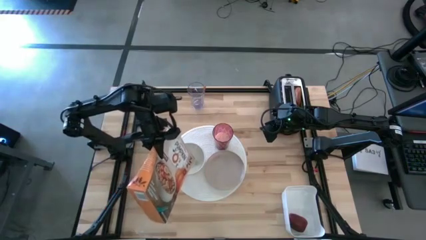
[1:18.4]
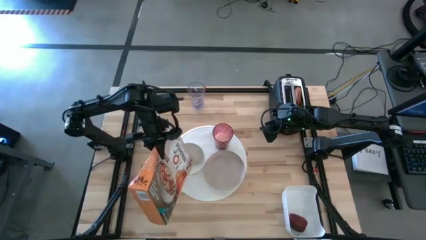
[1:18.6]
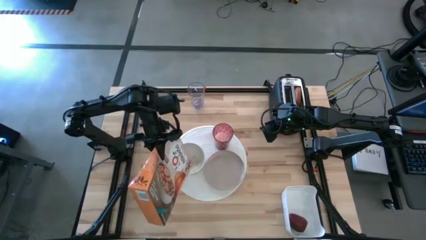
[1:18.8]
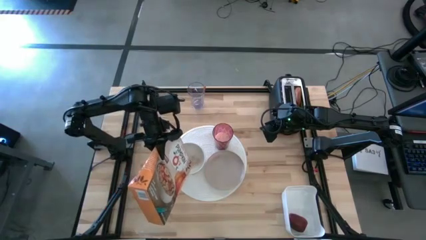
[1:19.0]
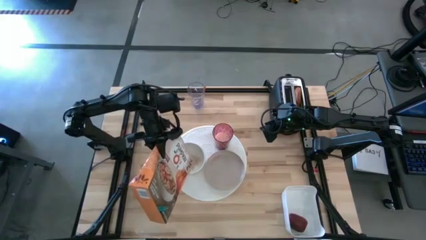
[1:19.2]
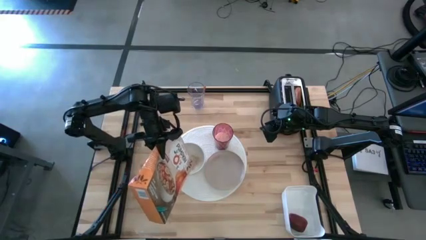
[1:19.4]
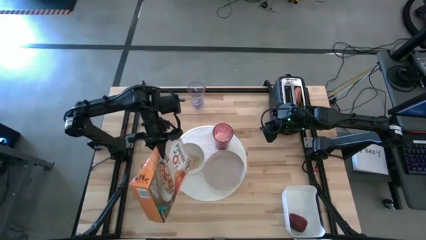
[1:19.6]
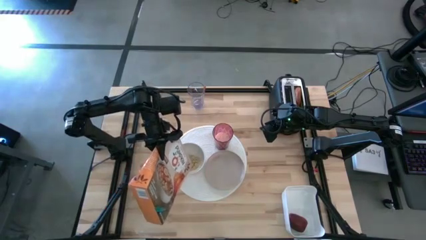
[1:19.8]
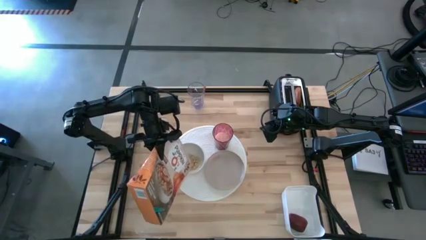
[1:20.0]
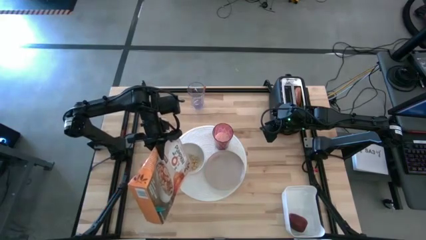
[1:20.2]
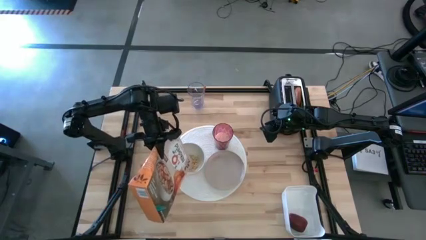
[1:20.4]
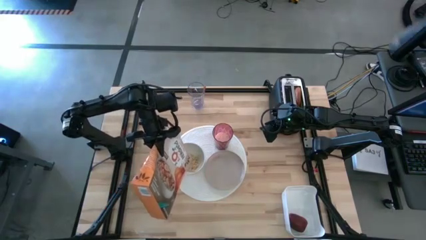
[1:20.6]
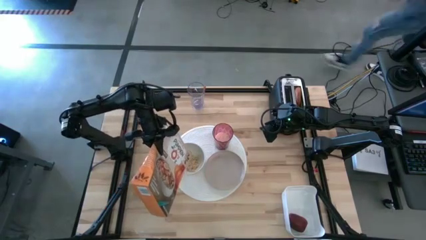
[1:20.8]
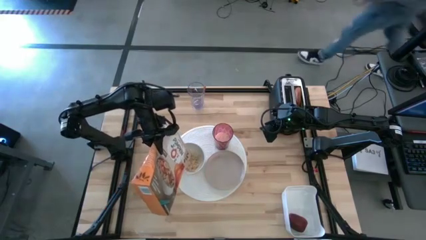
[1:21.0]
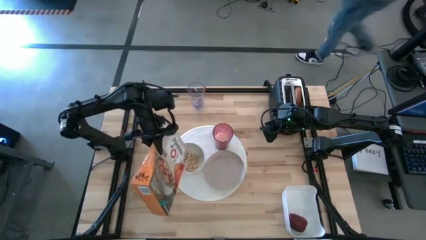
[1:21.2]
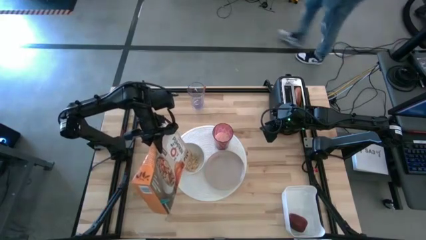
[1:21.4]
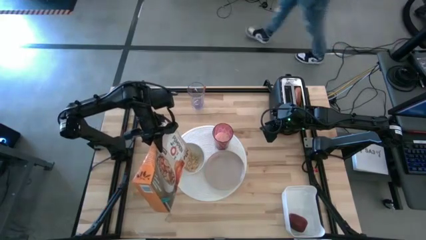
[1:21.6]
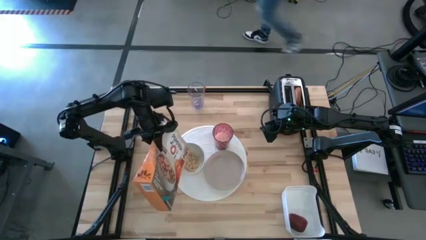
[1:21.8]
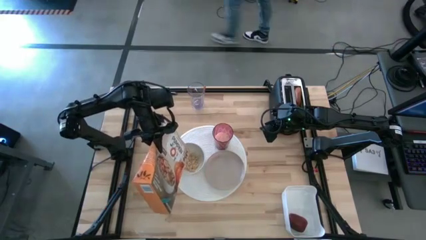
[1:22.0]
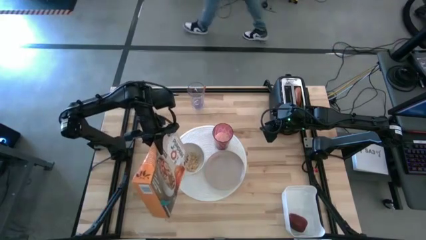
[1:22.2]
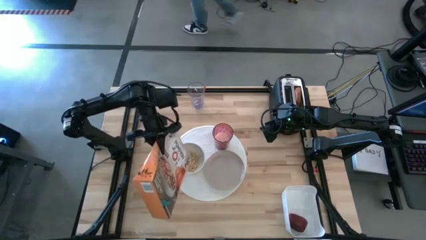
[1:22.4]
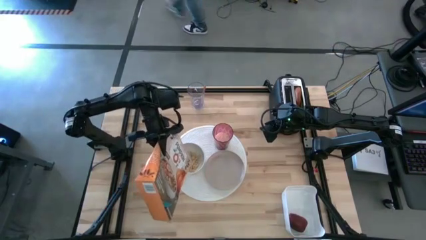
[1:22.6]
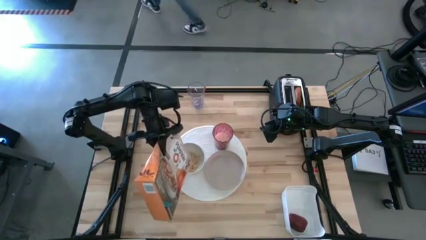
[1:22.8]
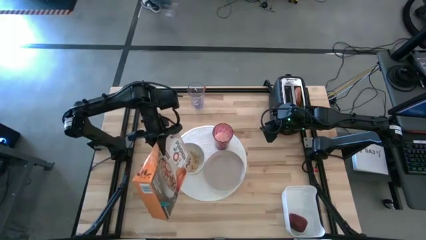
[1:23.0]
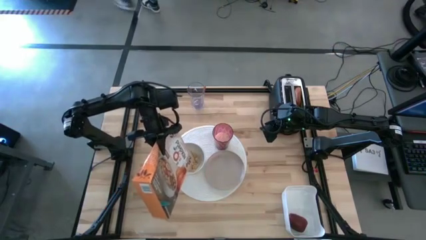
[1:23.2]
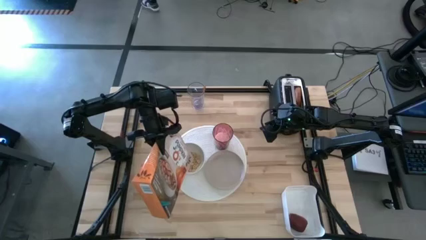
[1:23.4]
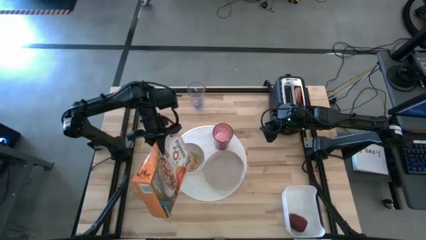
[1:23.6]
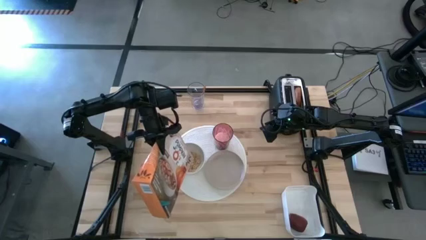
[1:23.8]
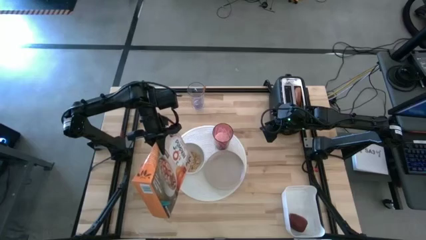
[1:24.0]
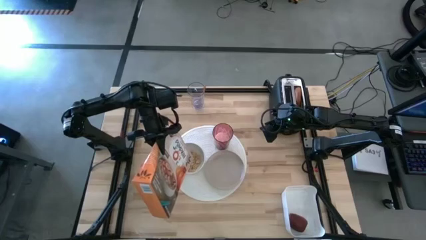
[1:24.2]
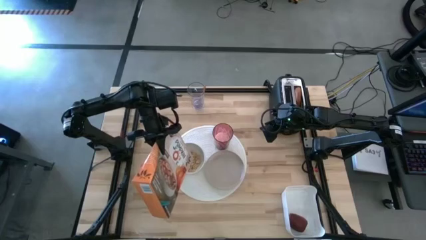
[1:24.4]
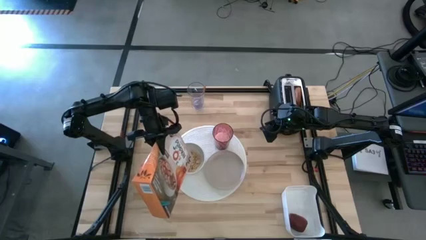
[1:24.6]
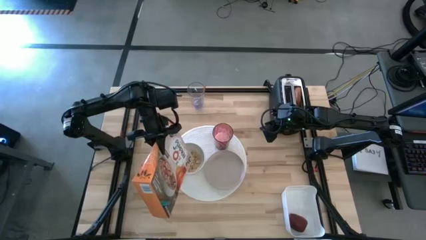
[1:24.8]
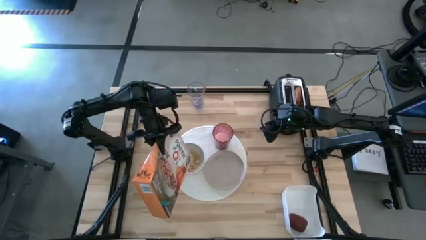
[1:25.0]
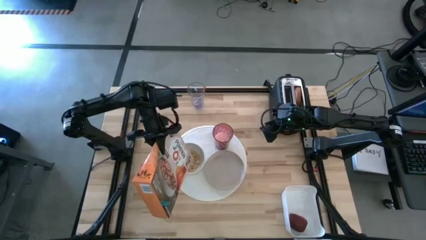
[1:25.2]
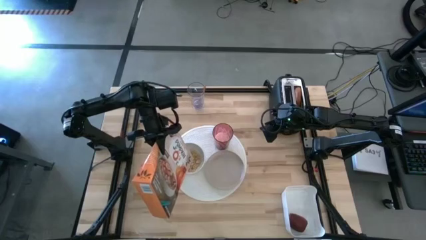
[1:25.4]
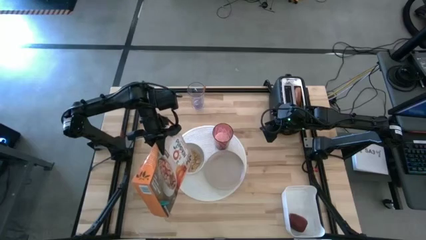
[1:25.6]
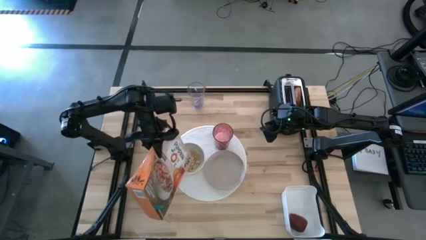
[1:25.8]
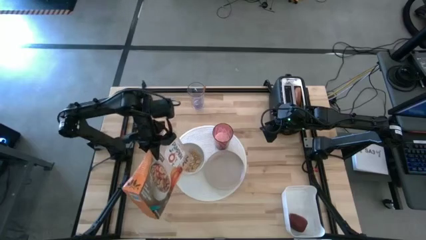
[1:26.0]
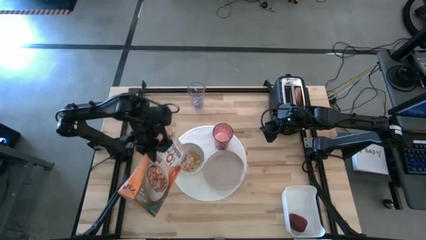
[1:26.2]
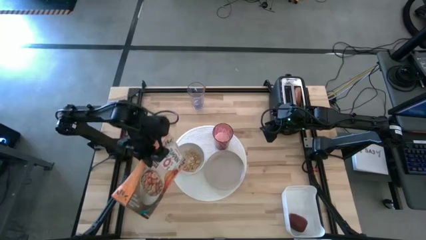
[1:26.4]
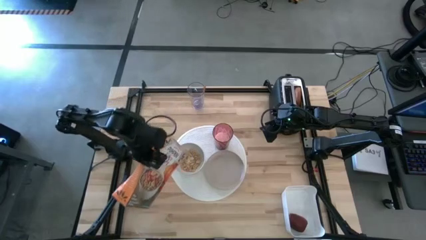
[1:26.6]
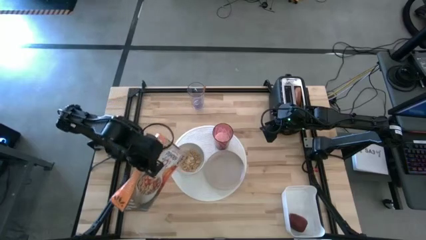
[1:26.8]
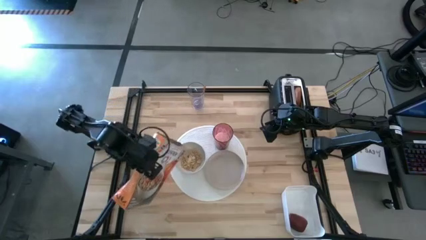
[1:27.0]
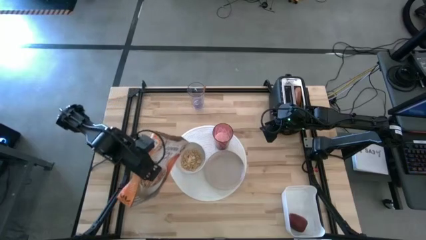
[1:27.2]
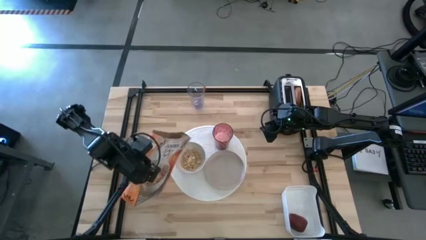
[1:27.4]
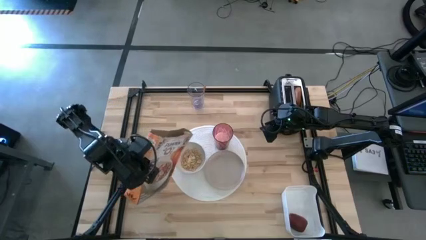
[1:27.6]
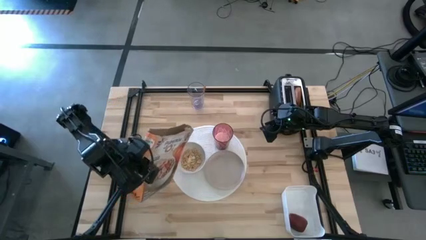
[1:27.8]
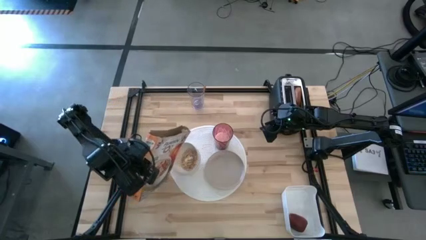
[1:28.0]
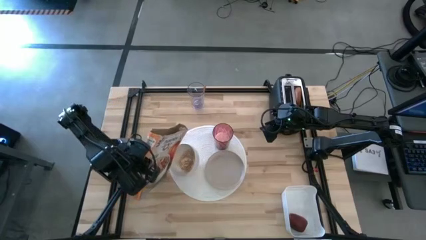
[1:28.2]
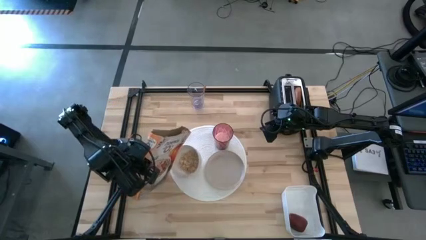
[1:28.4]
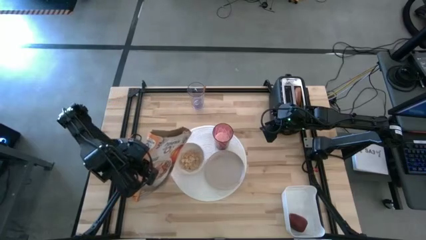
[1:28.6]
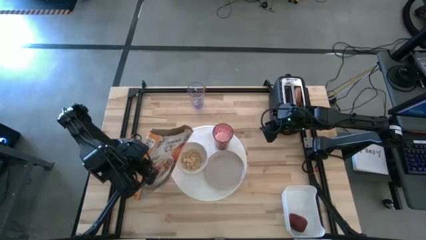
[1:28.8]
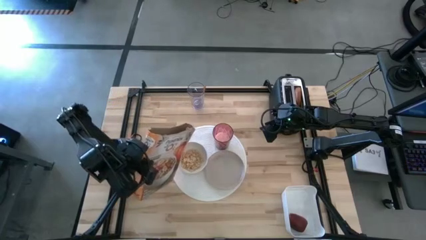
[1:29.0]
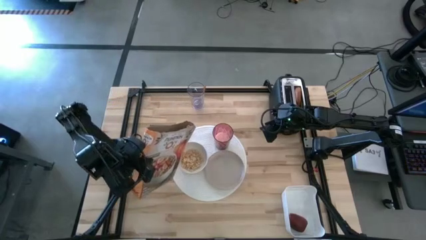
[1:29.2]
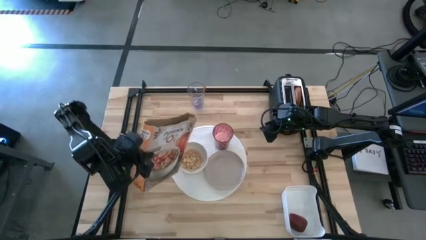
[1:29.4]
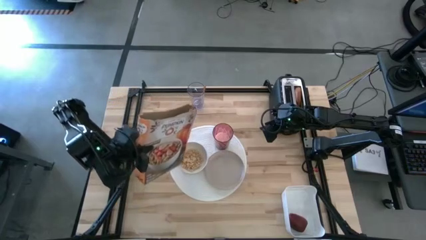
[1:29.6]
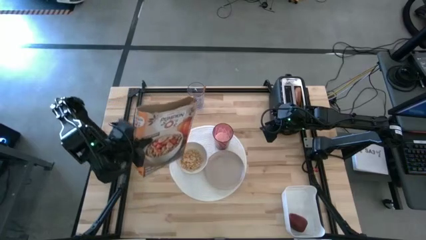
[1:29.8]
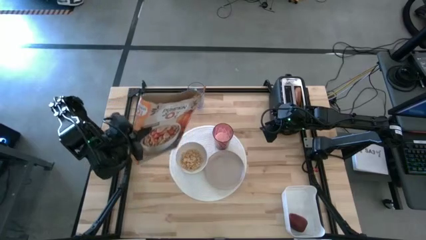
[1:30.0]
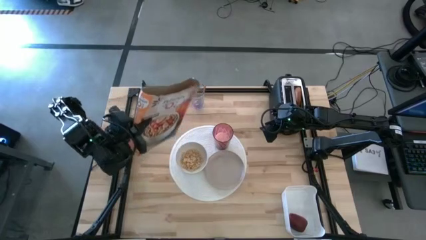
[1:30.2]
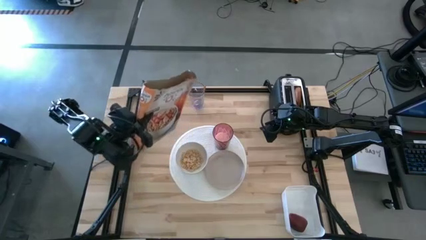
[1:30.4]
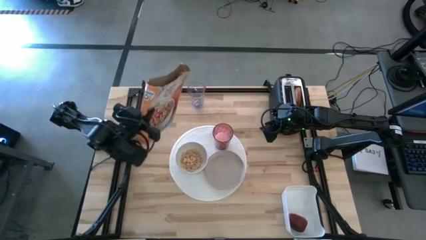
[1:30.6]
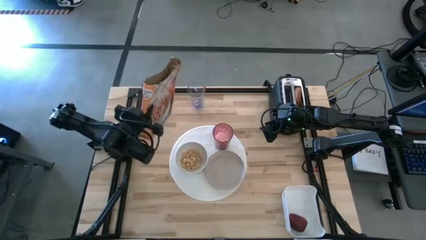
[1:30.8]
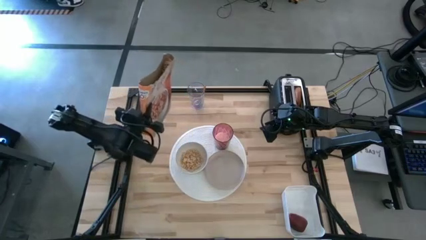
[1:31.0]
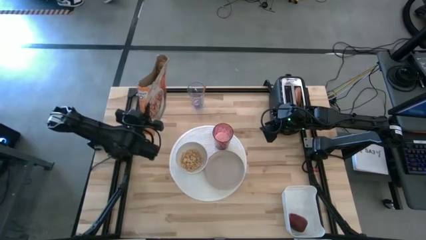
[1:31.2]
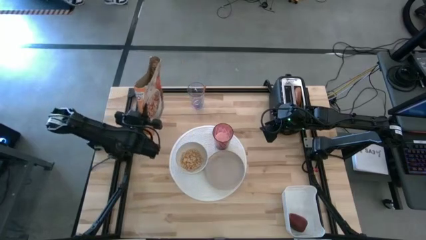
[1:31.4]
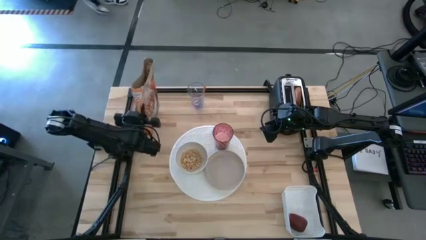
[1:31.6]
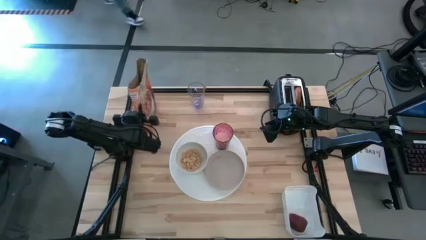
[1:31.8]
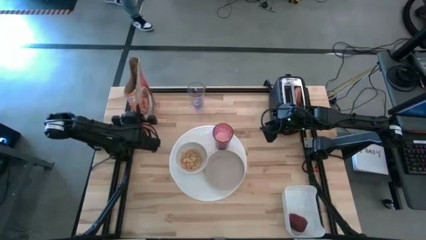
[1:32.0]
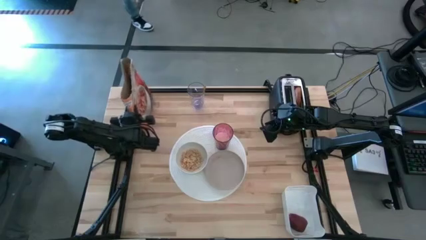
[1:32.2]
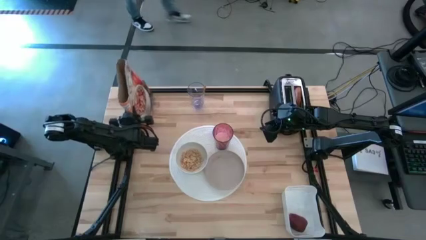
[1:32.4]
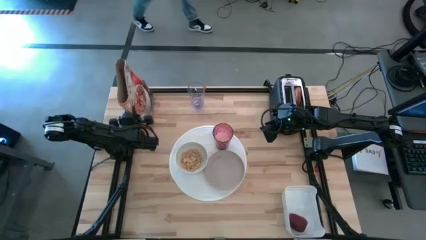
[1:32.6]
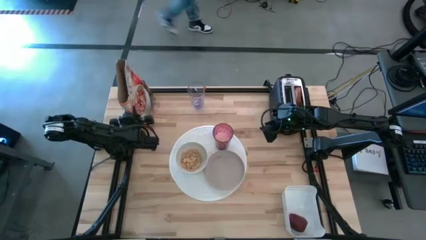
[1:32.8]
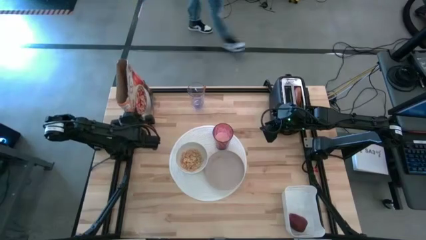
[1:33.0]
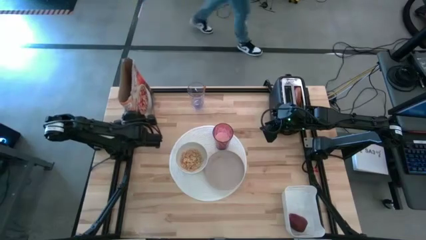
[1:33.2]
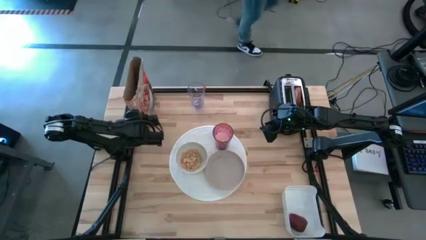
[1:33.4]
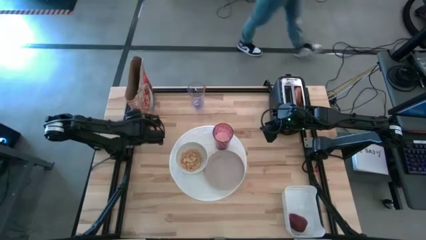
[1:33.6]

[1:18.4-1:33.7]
Task: Arrange a breakfast setting
Pour the cereal from the orange cereal box into the white bowl

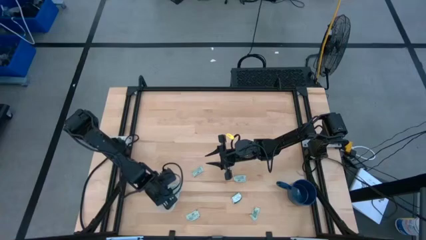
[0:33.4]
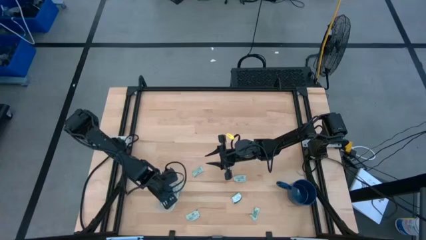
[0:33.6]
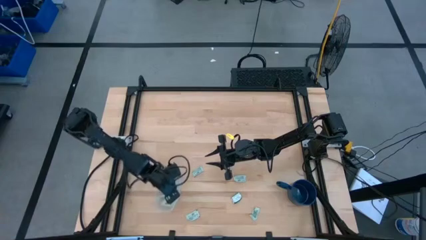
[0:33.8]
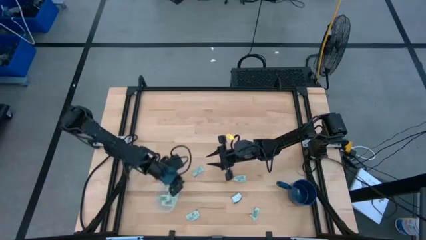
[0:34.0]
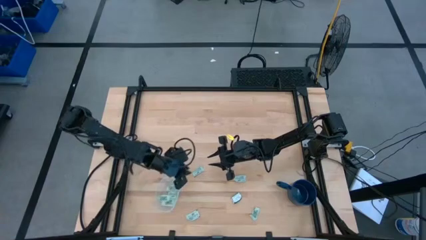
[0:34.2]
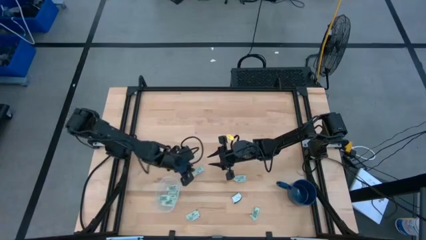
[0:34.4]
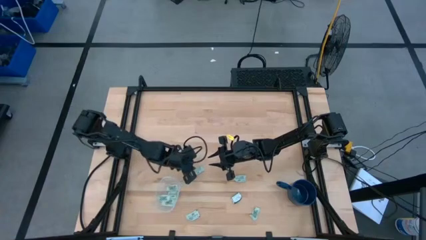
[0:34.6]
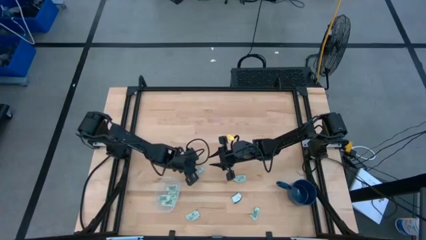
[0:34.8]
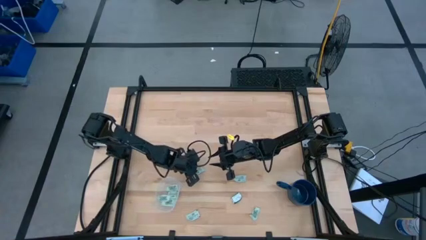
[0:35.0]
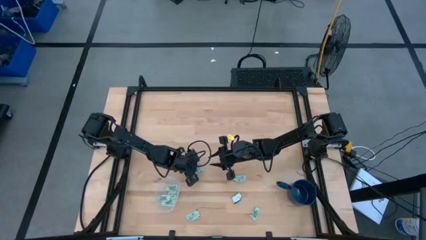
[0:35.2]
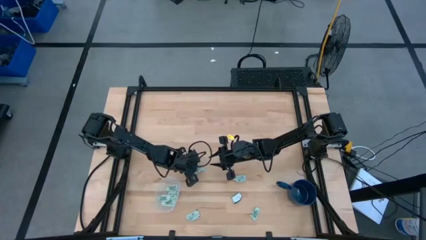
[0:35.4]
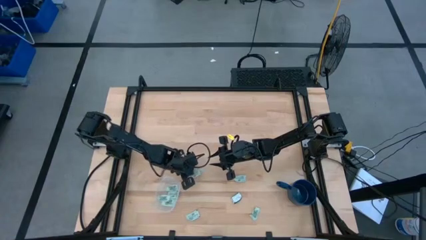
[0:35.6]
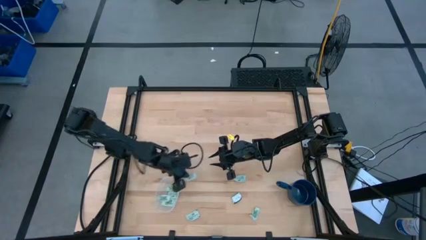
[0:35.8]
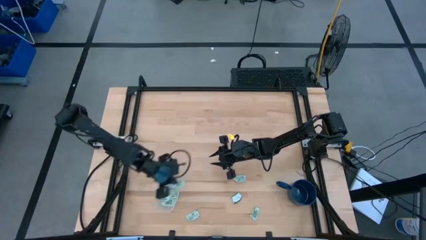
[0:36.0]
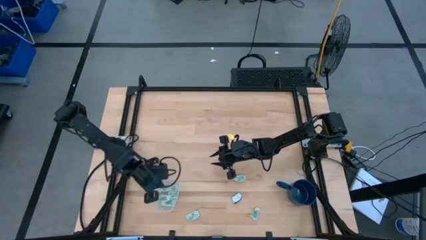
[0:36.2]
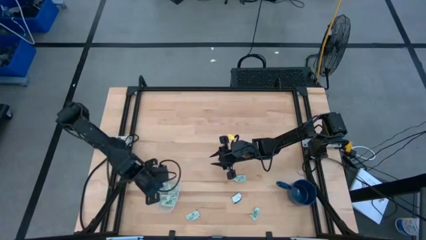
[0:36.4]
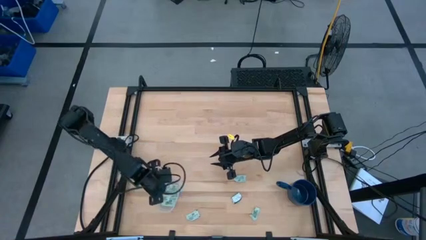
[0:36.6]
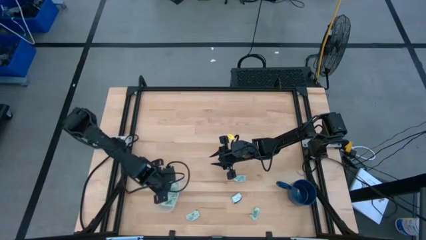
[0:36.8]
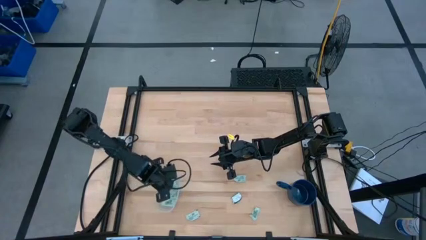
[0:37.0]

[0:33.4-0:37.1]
Task: Pick and place Stevia / Truvia into bins
Put the stevia packet into the transparent container
